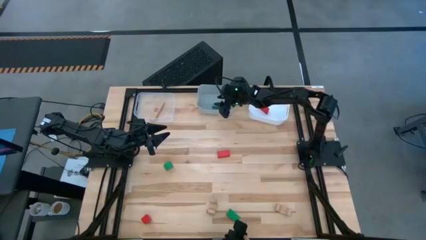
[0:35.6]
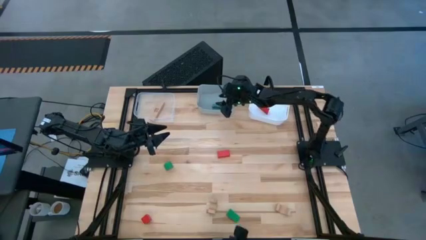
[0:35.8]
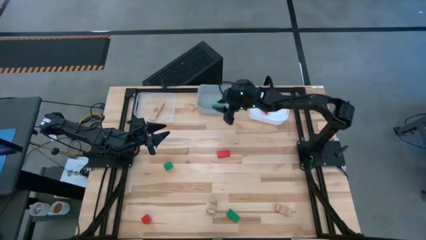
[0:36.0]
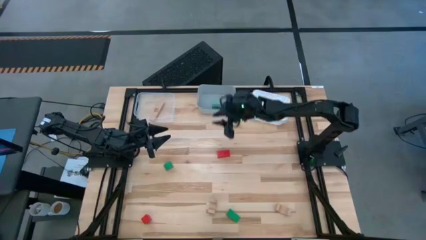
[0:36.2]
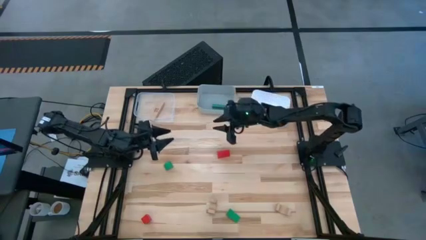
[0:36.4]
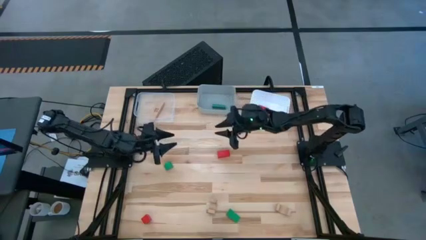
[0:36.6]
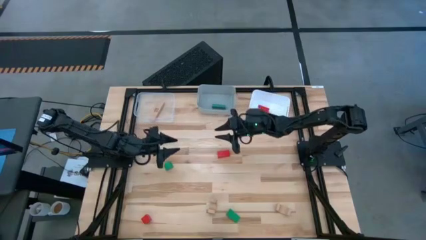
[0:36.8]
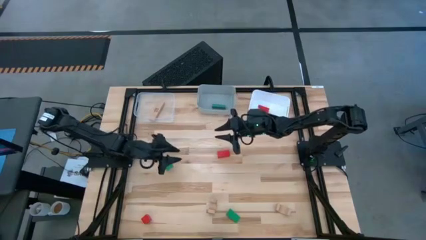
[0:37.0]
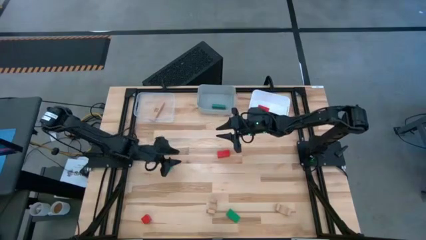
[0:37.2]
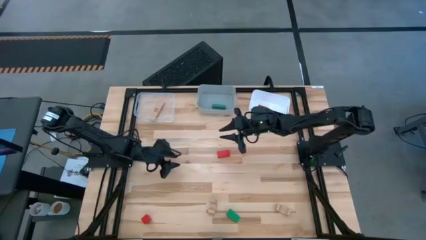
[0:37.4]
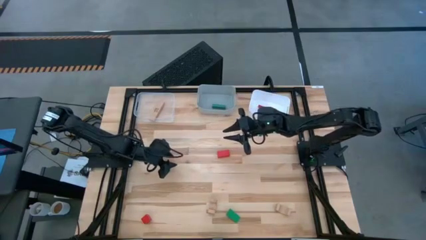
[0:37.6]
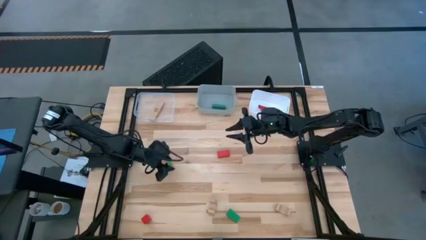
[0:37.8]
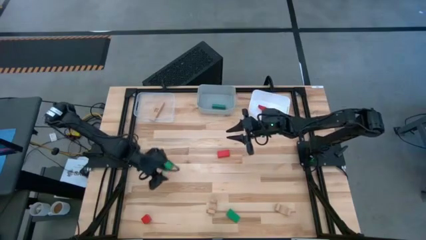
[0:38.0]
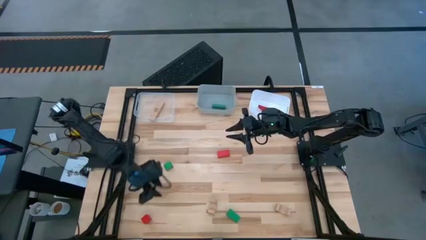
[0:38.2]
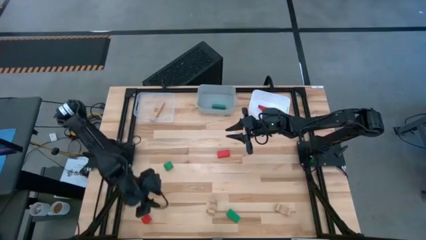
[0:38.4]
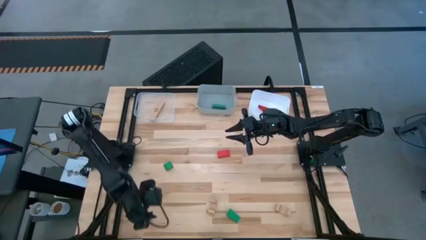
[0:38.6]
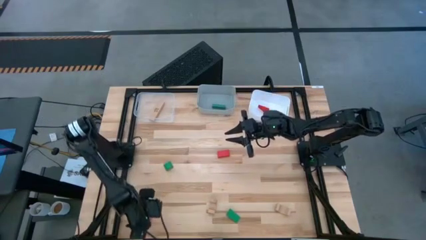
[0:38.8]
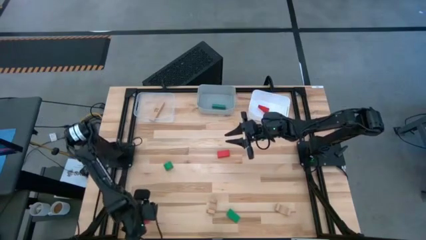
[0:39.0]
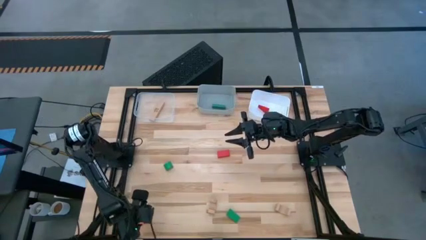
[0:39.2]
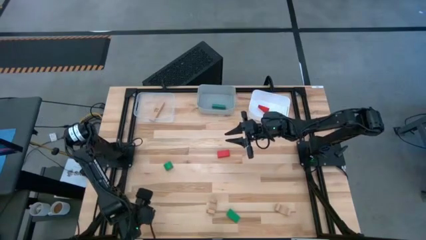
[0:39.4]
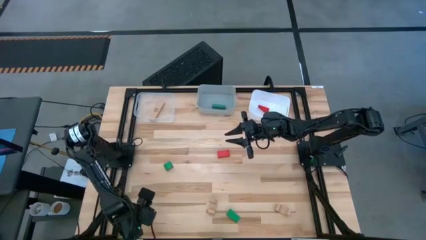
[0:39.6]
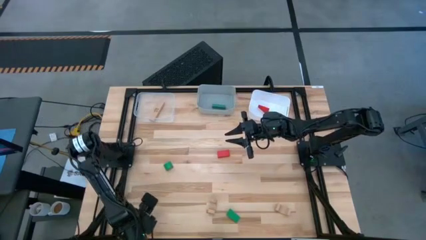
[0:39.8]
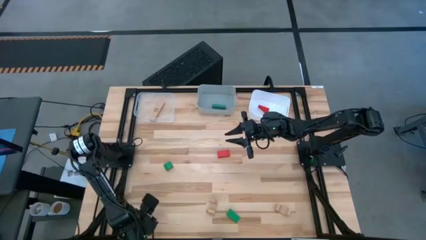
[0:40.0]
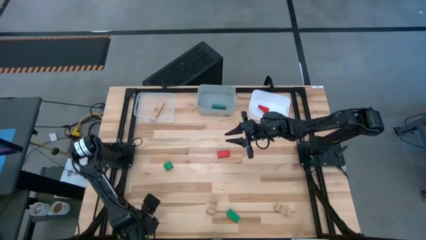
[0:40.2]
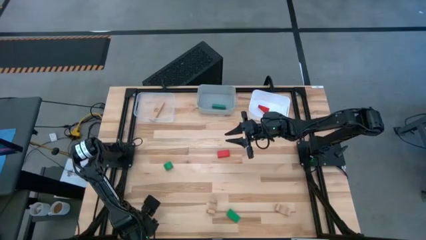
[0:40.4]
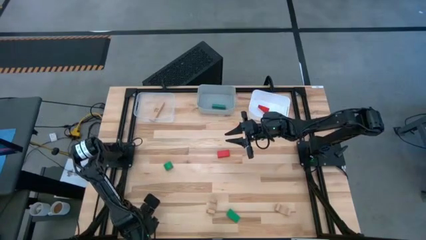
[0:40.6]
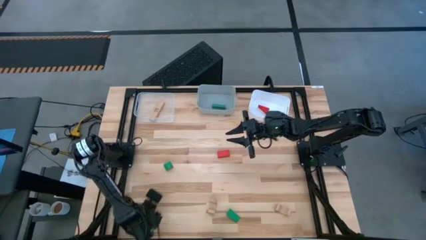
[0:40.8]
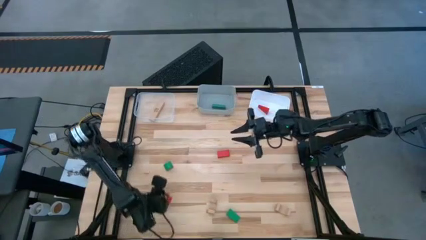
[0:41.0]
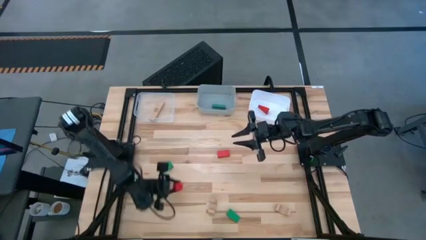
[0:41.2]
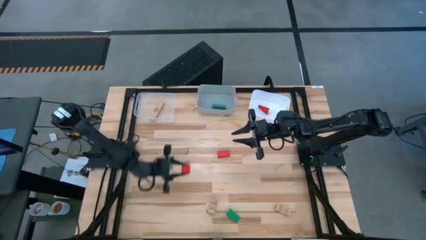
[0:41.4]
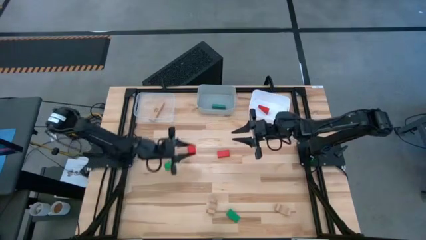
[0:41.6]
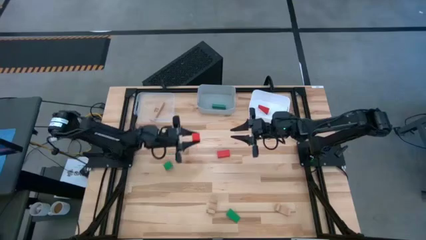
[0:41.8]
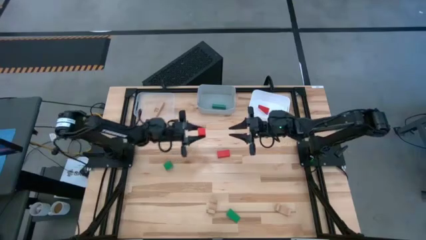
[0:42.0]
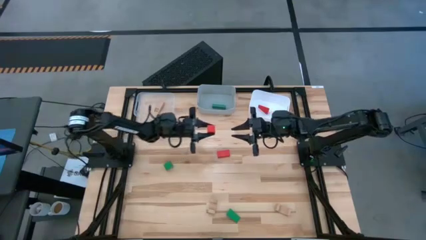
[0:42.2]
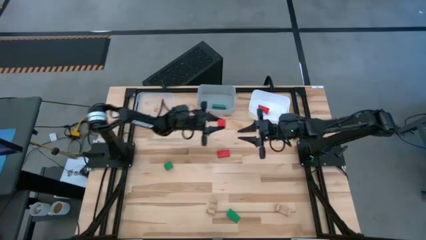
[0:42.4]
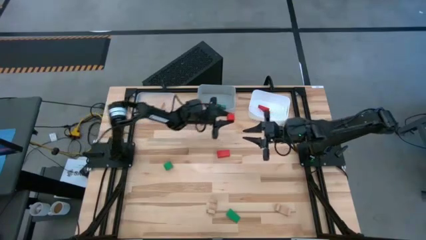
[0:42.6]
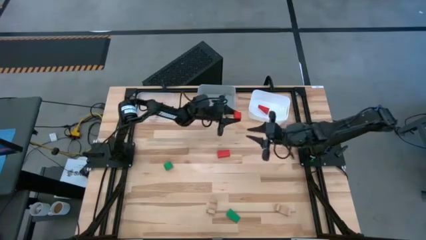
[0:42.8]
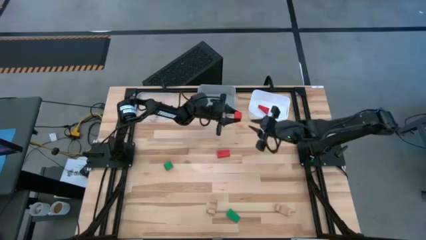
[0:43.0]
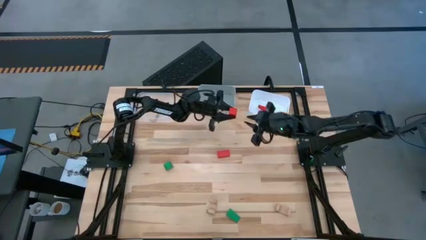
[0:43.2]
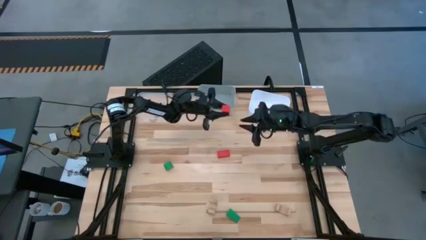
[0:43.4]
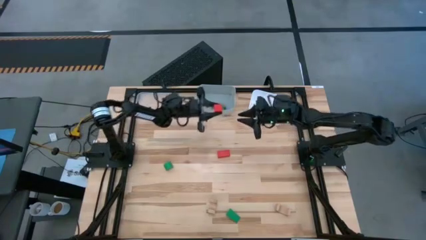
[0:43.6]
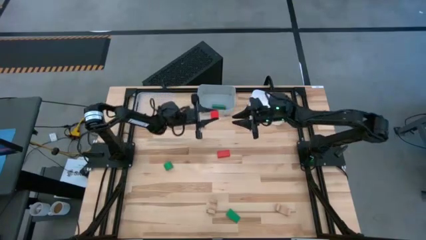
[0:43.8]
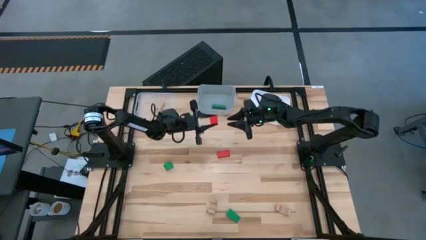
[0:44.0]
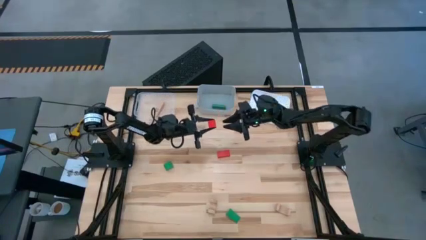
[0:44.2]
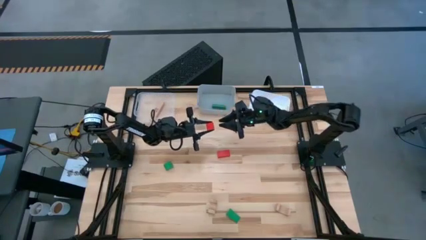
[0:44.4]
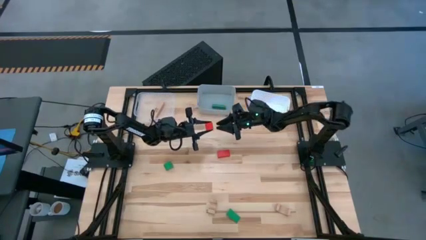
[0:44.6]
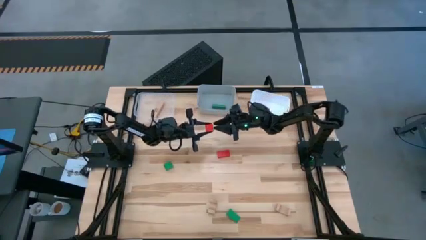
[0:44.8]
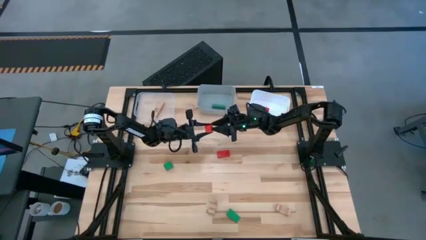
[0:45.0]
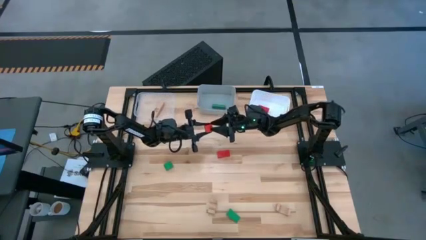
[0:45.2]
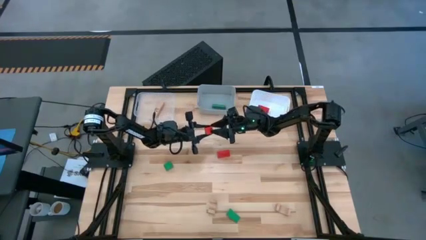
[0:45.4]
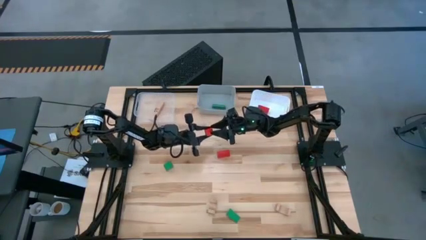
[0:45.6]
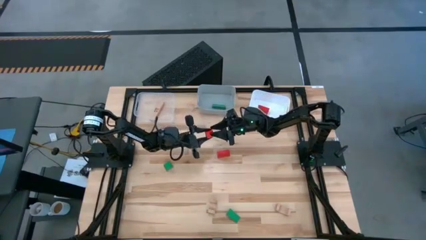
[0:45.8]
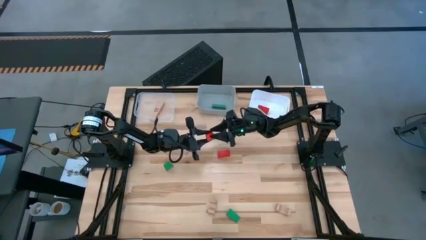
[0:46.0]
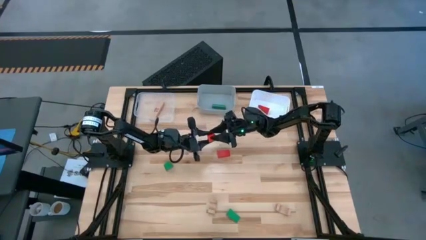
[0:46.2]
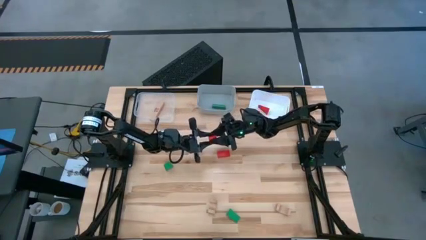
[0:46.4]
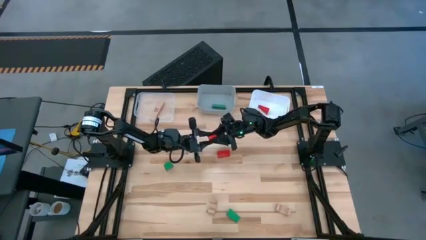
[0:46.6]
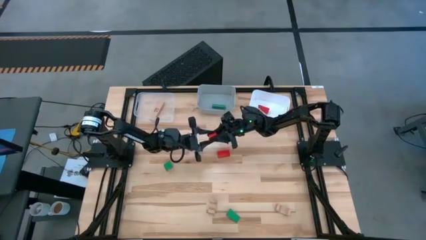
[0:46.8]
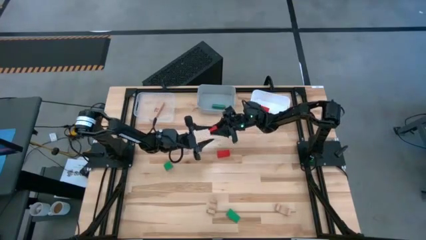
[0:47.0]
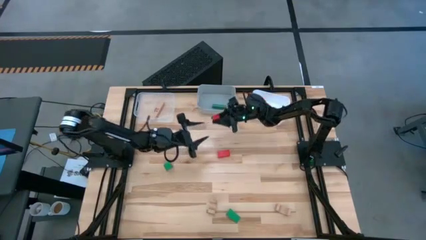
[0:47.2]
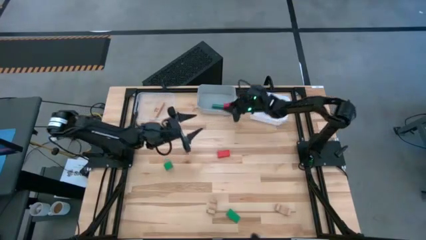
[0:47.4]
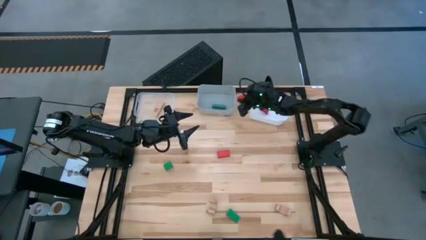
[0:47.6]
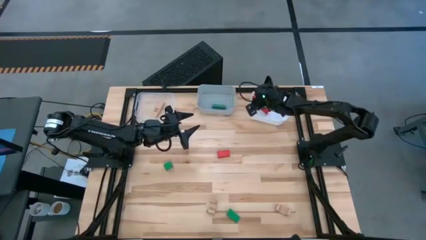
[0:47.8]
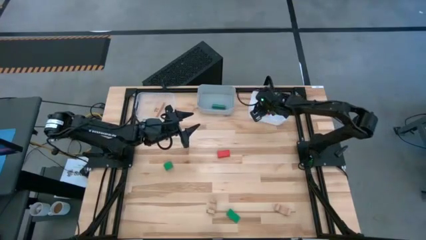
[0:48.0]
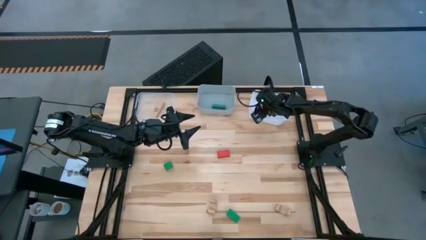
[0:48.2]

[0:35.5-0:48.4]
Task: Sort & place blocks by color
Put the bottom red block into the white bin

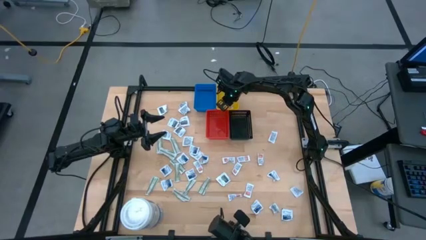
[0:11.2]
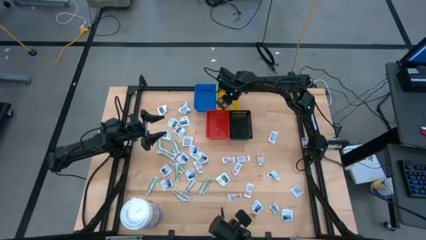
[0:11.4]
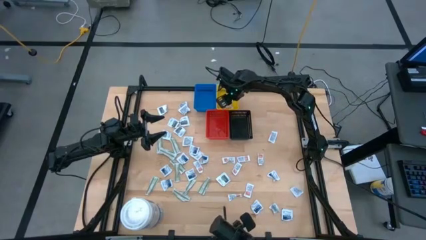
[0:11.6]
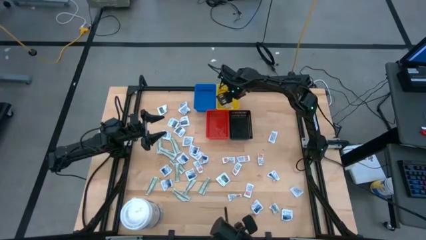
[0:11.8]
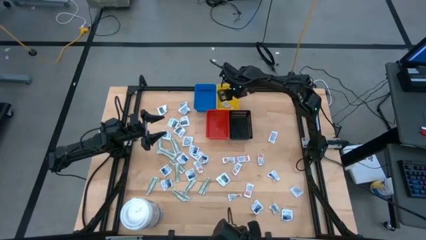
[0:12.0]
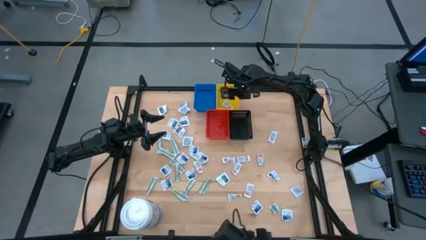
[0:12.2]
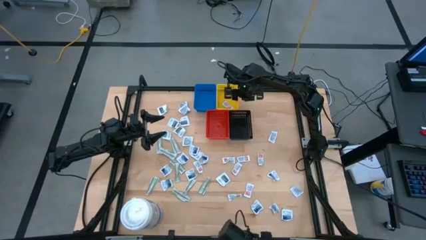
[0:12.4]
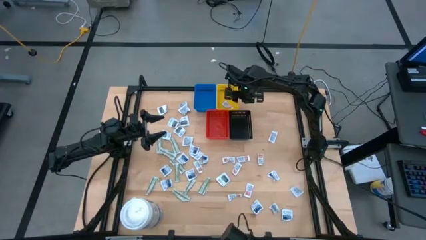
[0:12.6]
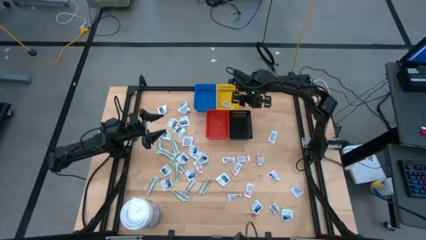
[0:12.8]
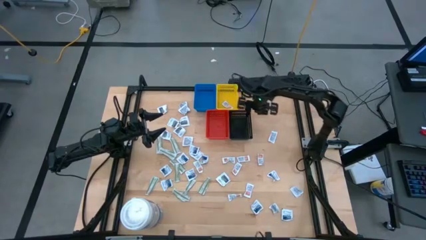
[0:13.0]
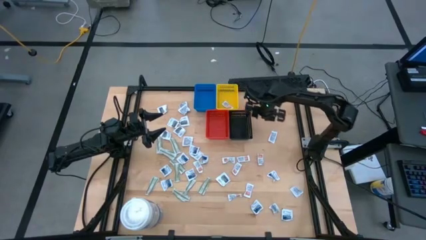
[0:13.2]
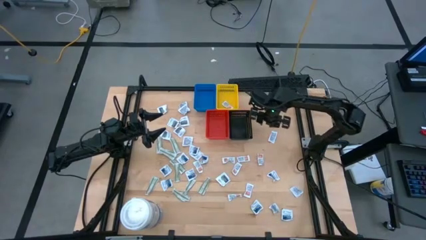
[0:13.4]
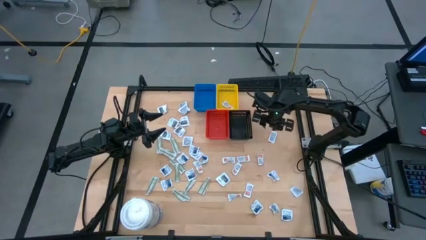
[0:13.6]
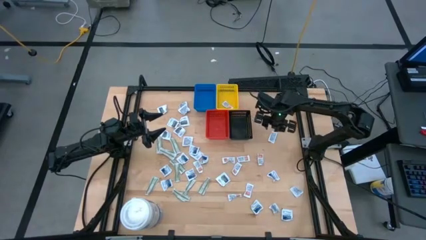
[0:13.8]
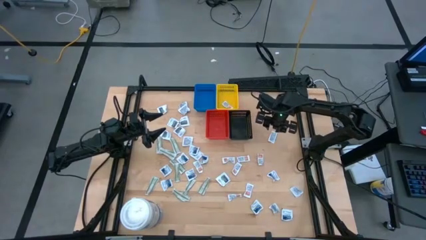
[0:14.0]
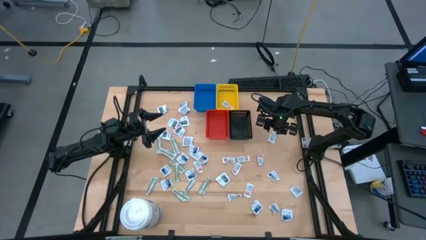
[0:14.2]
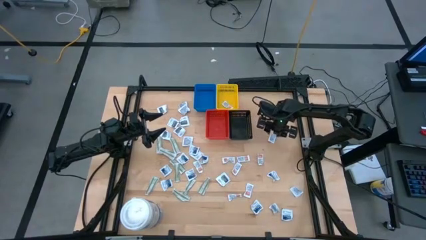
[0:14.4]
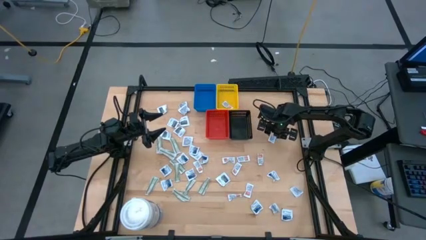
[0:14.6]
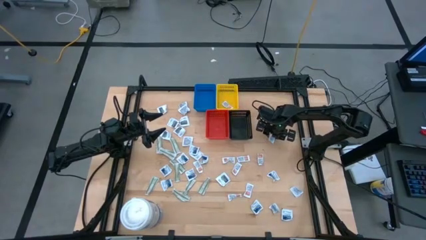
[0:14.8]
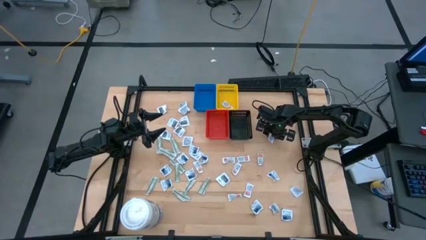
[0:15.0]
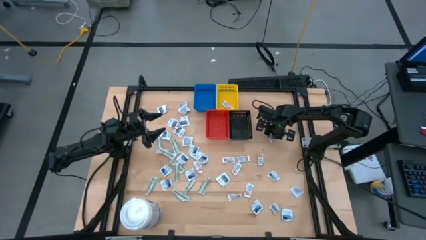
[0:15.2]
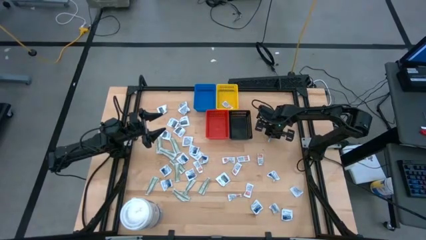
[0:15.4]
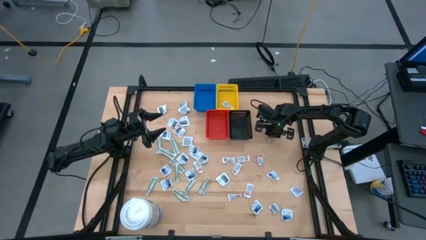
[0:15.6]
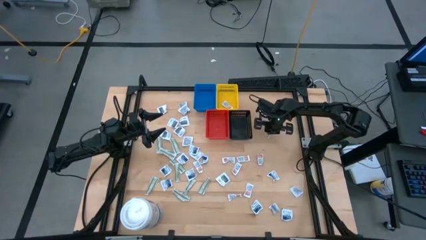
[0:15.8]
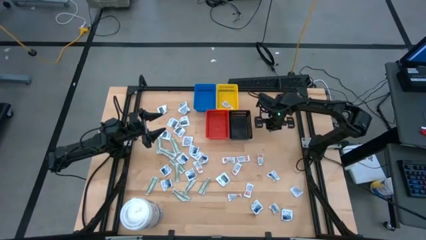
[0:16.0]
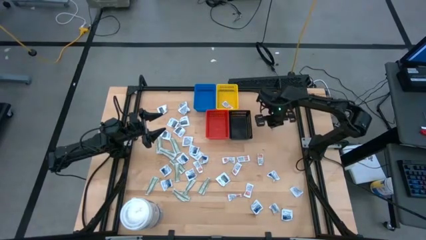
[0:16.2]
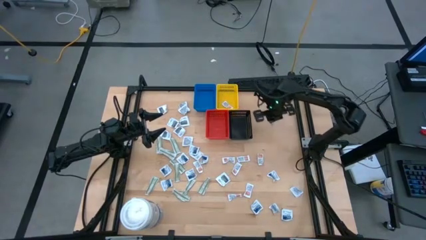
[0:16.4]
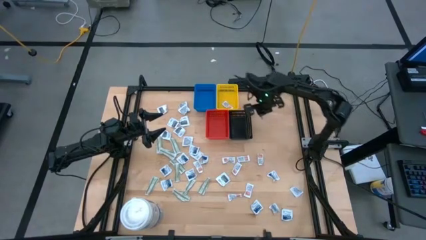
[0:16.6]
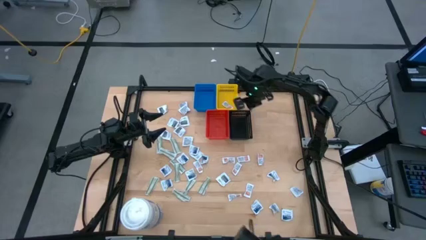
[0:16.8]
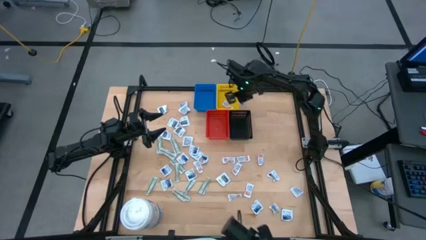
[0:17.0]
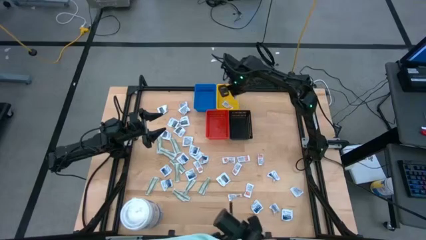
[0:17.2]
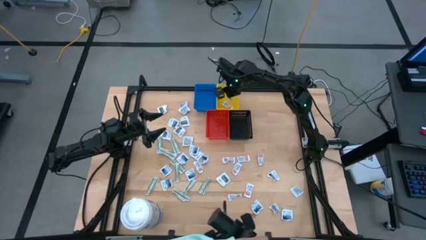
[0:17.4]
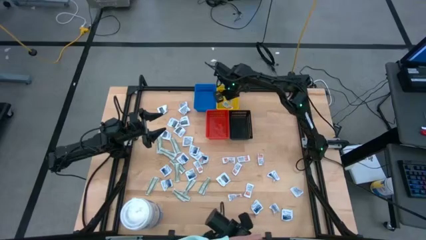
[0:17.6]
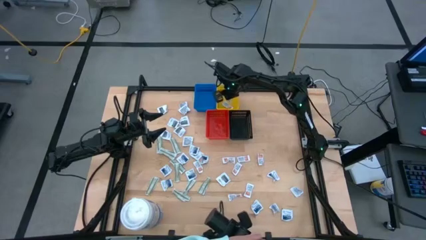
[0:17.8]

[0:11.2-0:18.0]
Task: Pick & Place First Aid Supplies
Put the ointment pack into the yellow bin
